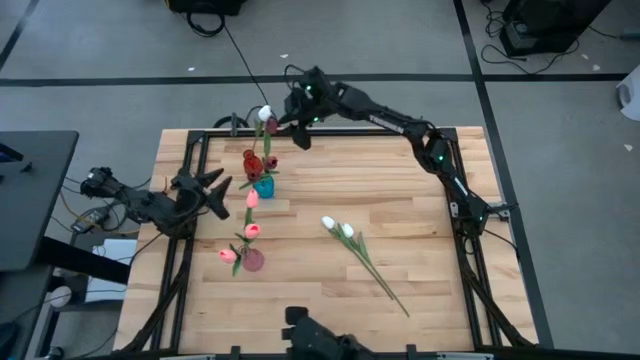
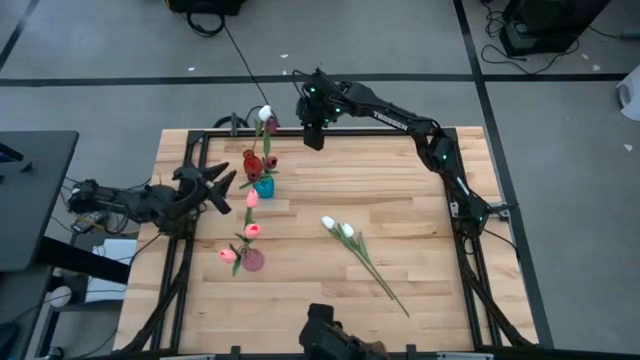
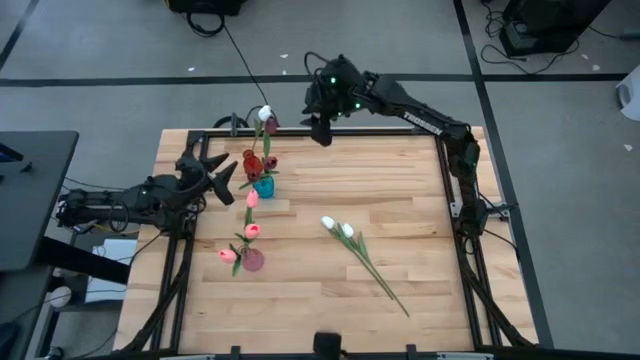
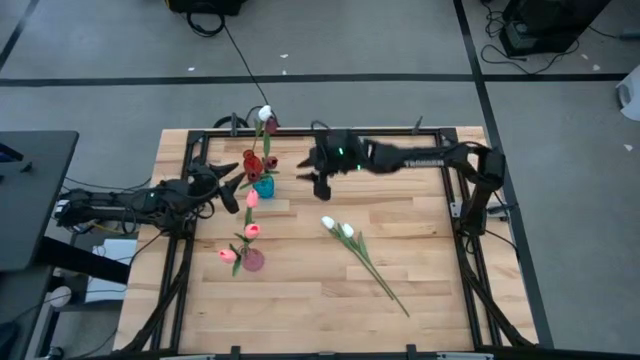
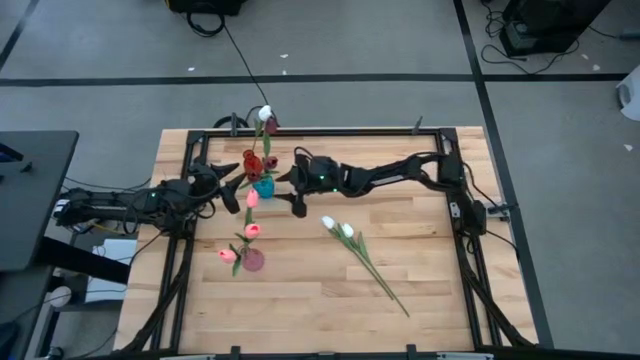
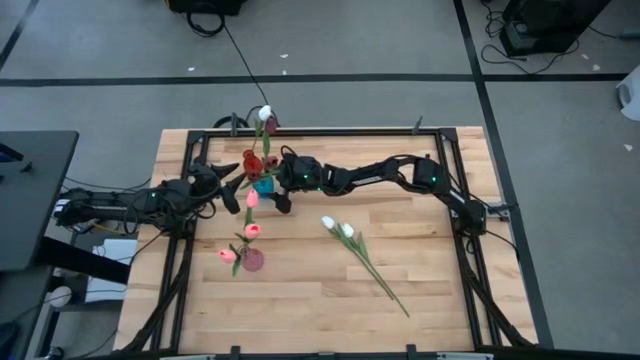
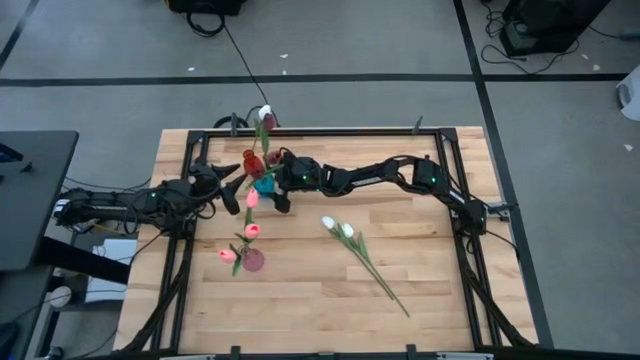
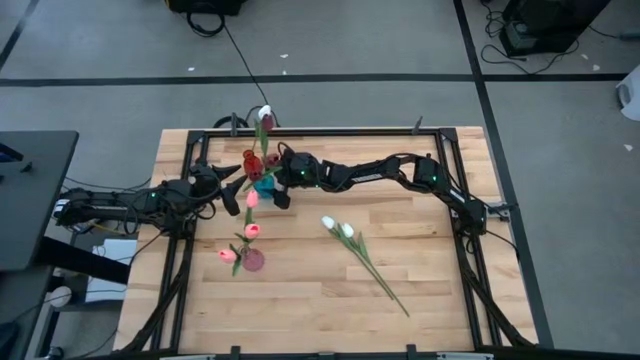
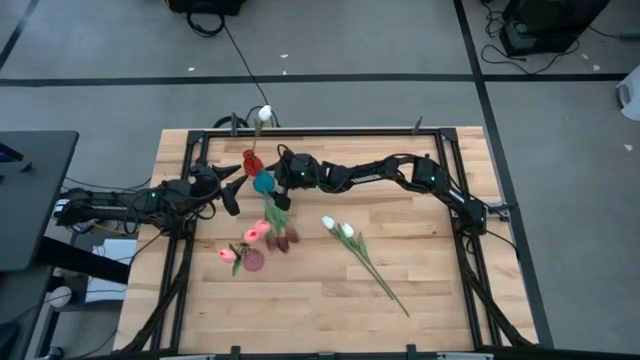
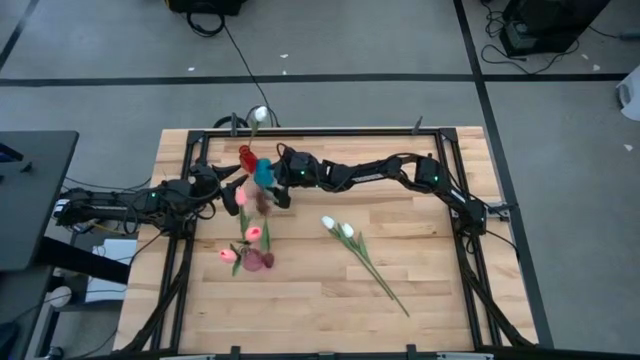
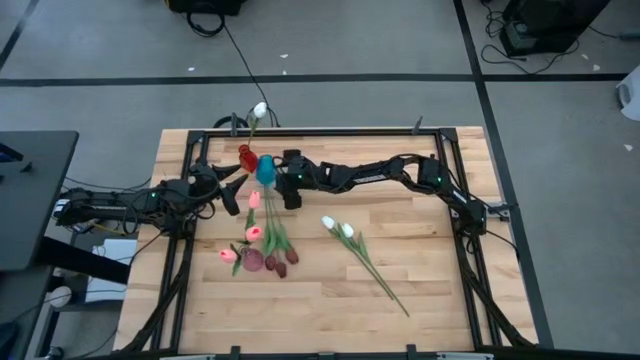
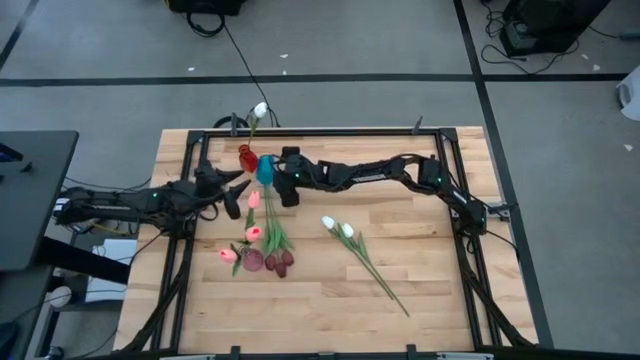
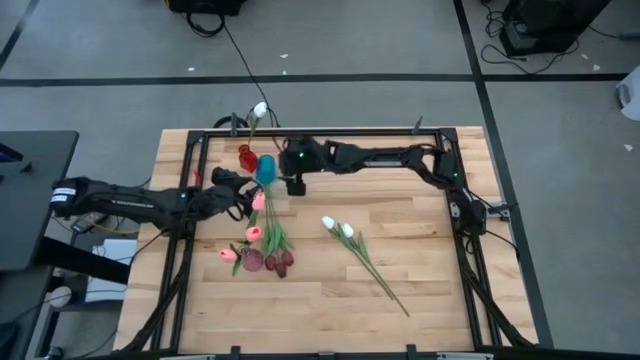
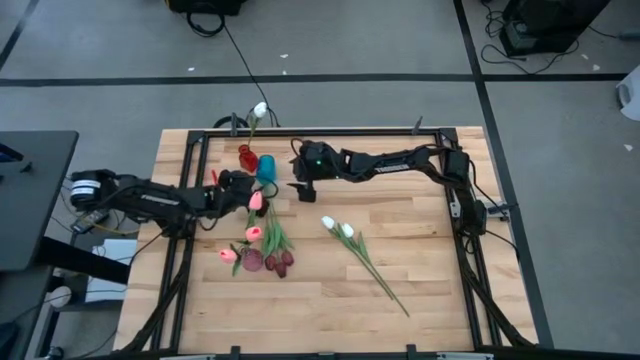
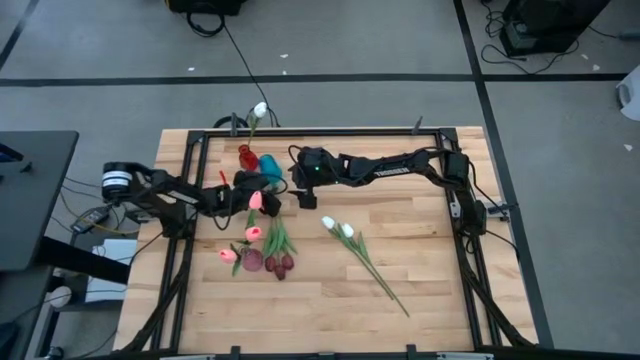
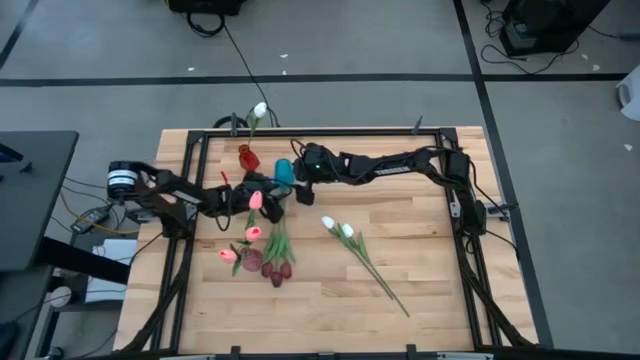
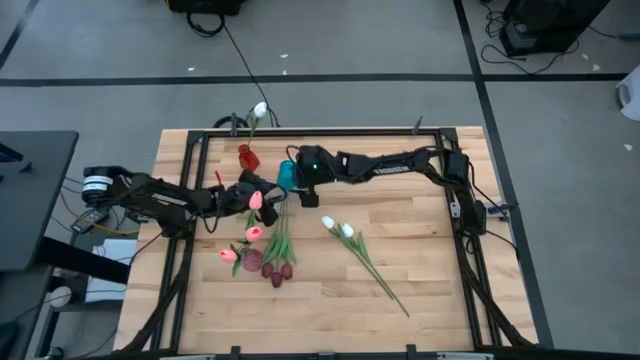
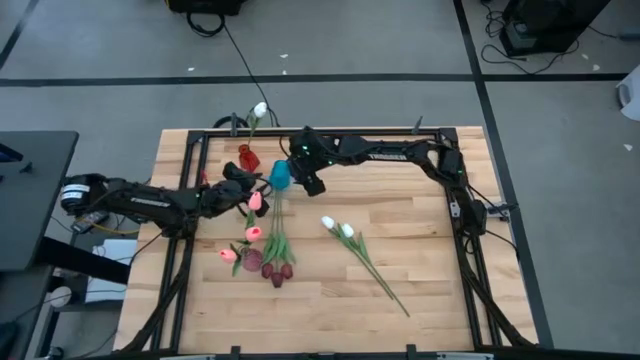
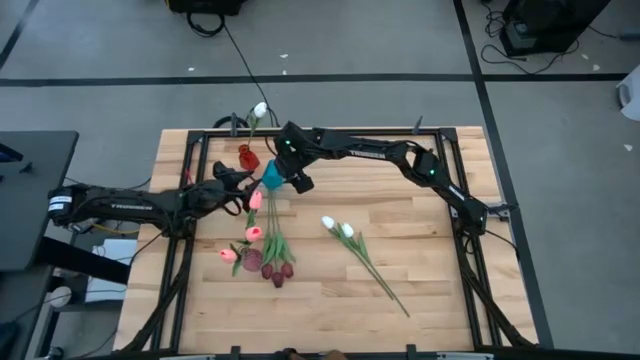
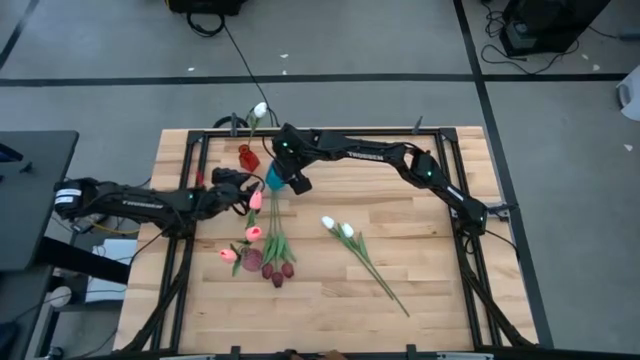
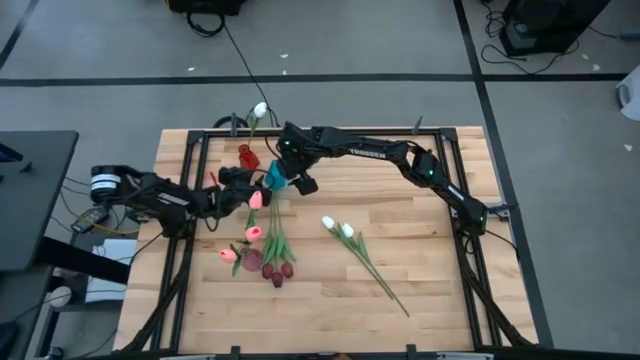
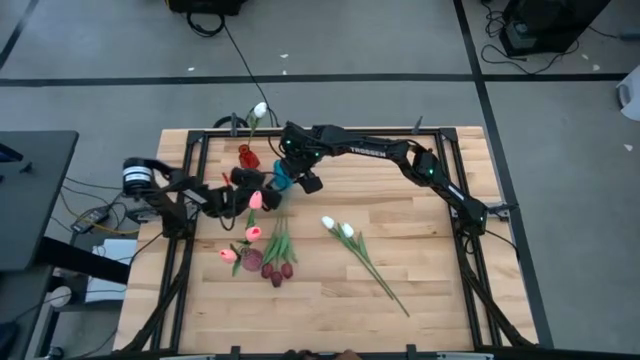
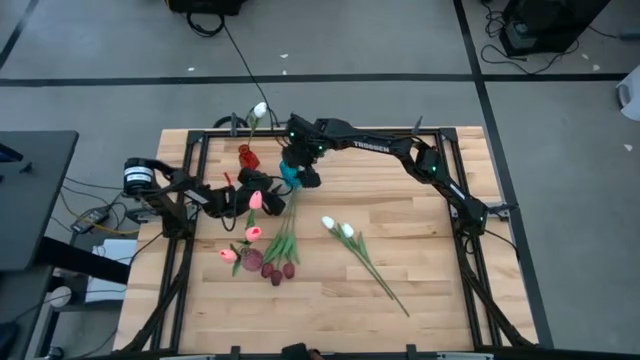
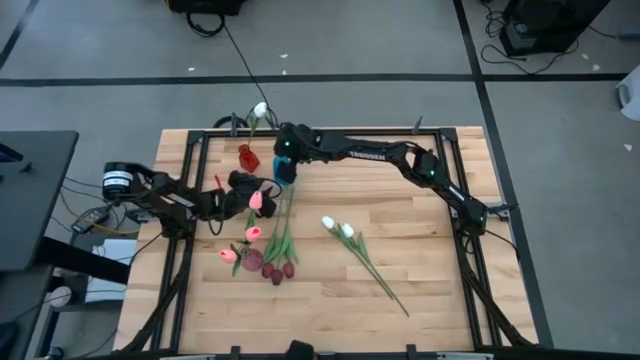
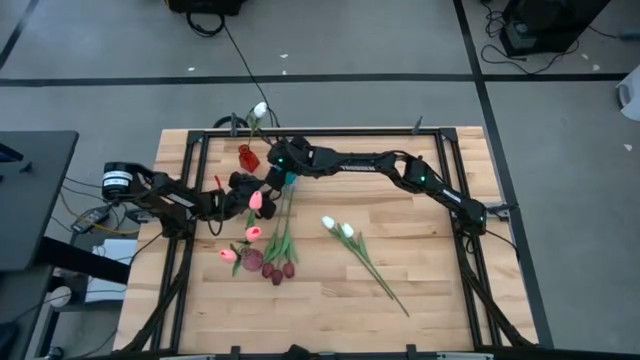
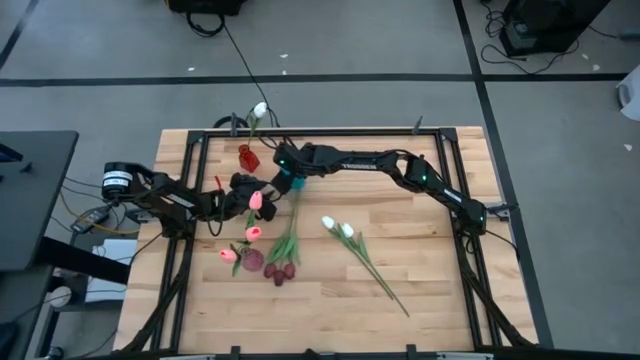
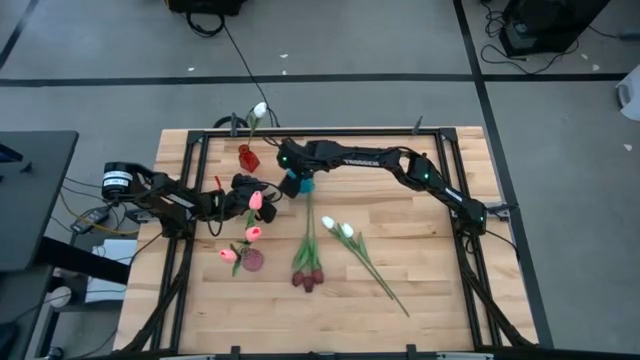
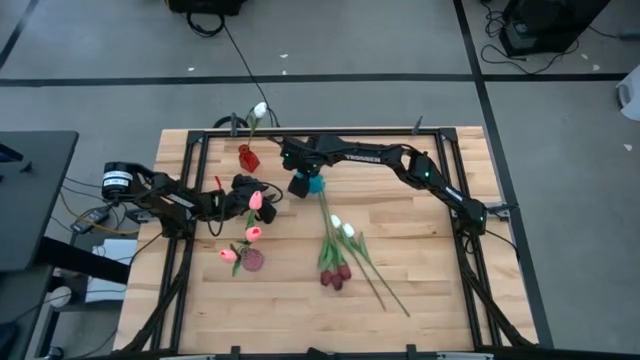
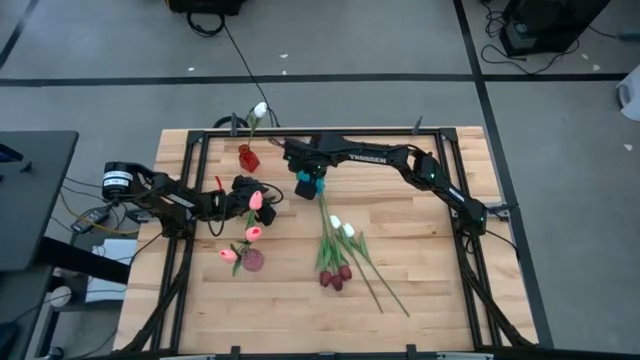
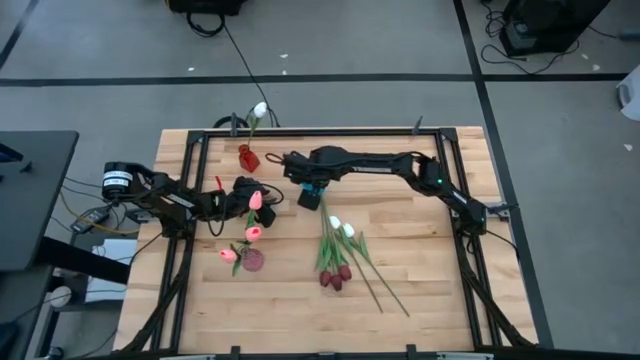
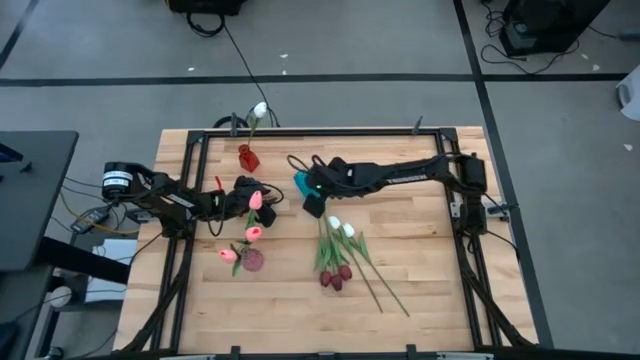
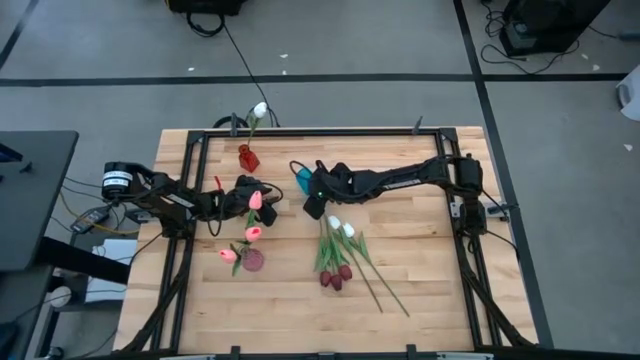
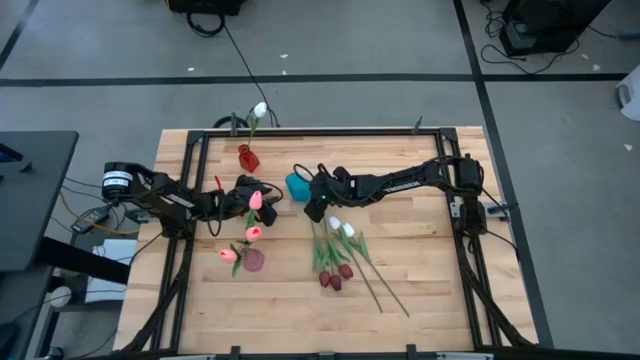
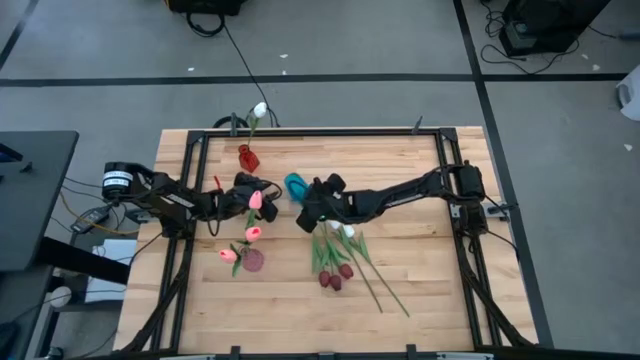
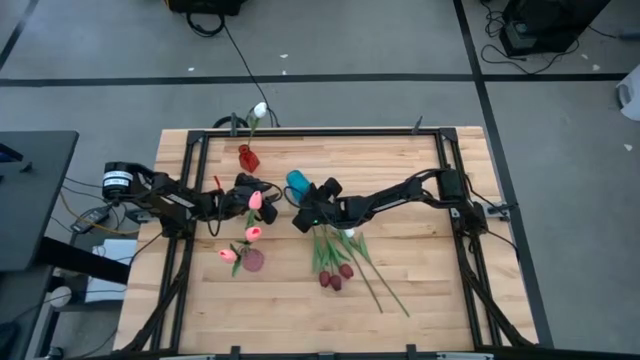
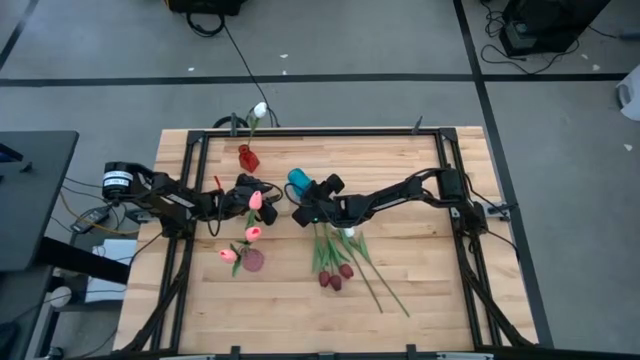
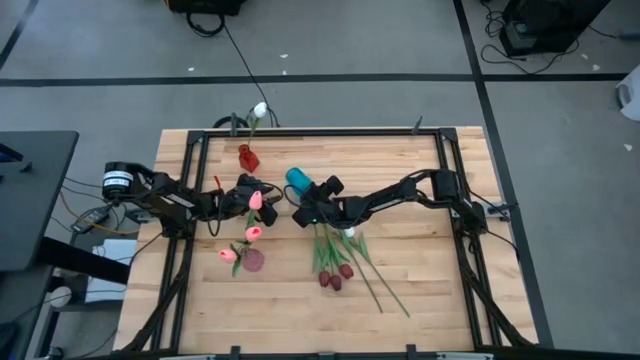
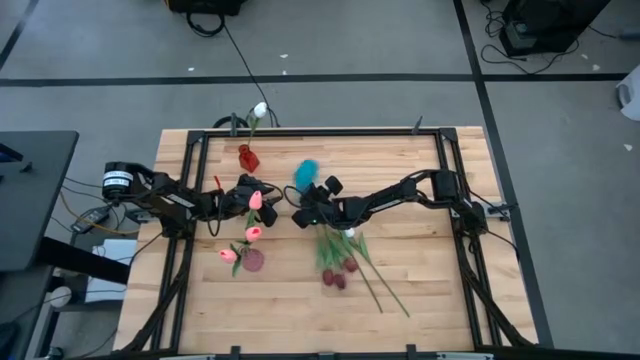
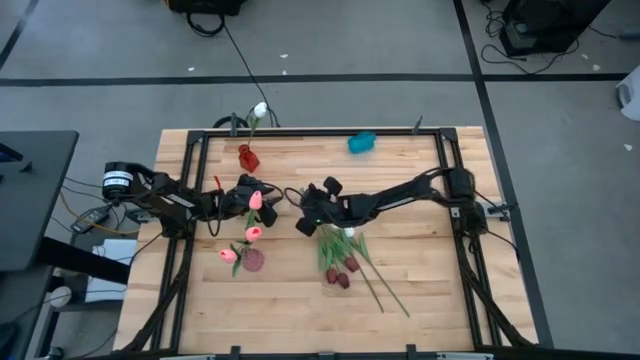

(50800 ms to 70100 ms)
Task: Sort flowers into vase by color
Adjust the blue vase

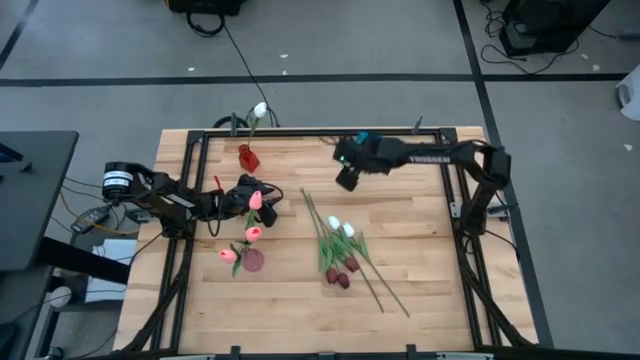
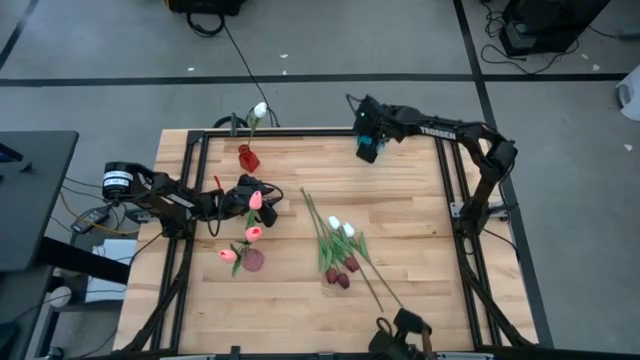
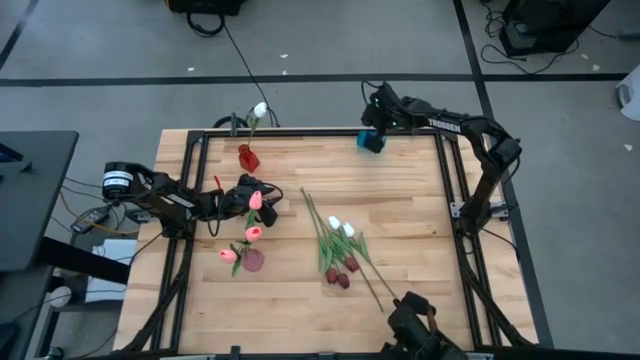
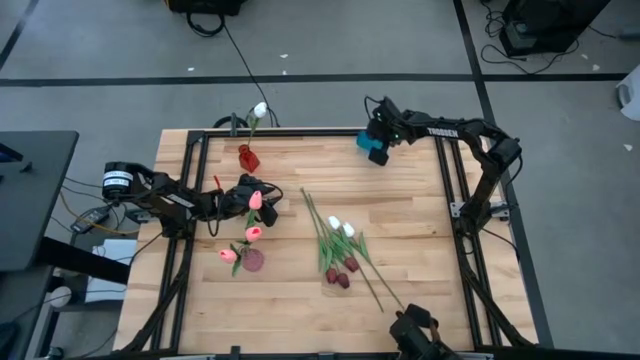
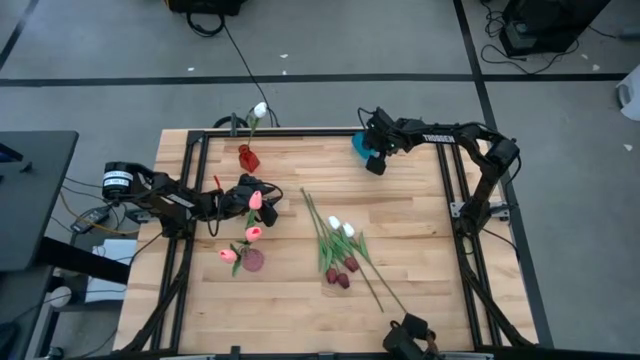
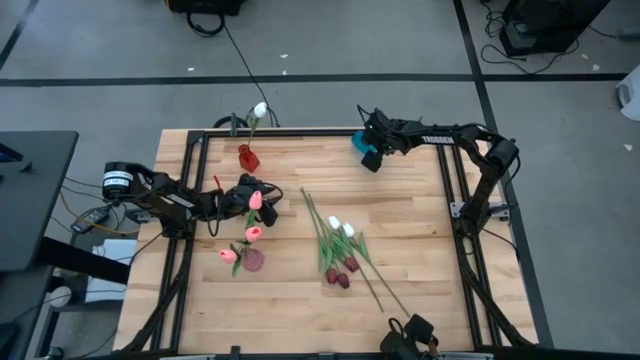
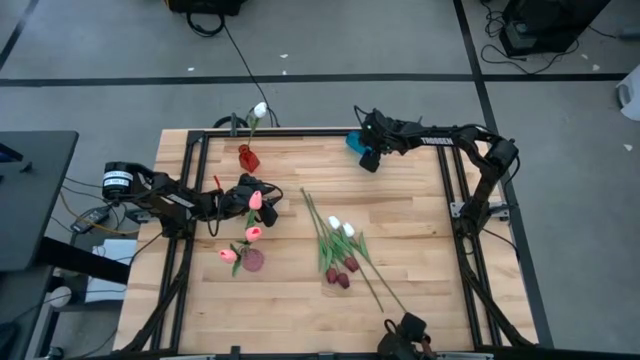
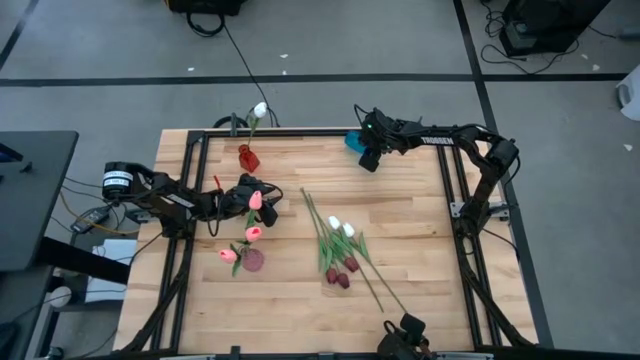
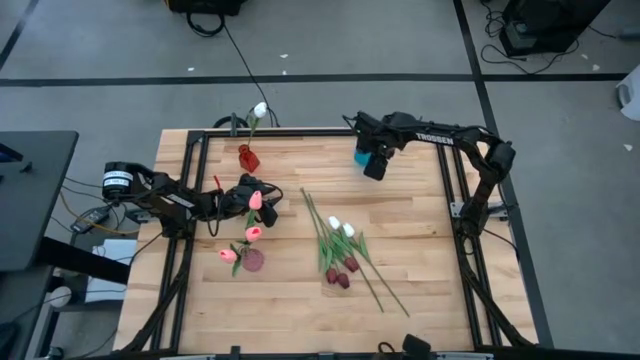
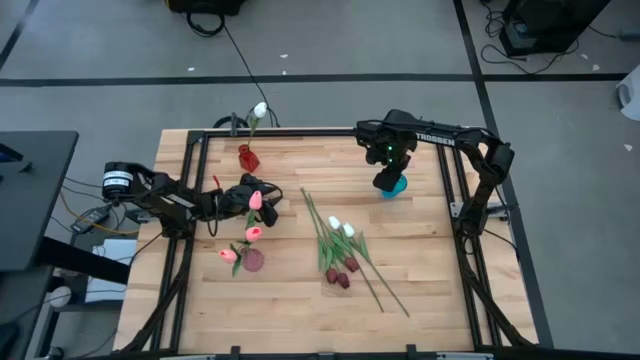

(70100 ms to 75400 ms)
Adjust the blue vase
